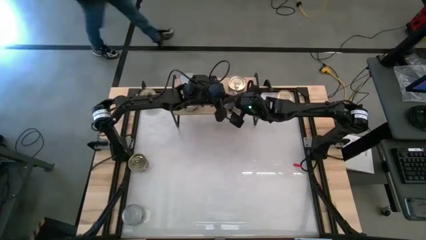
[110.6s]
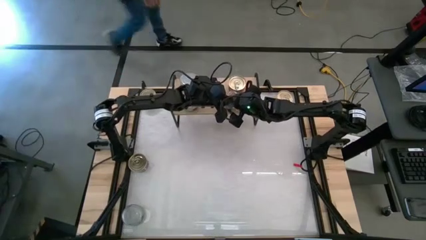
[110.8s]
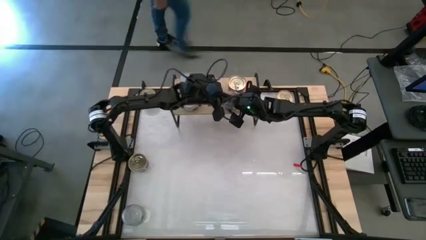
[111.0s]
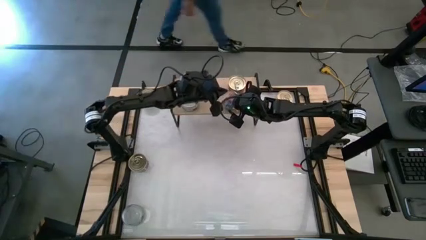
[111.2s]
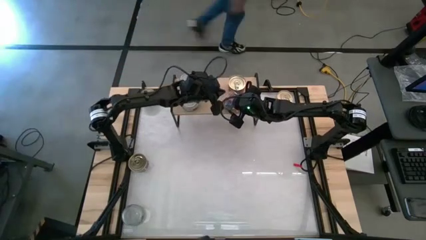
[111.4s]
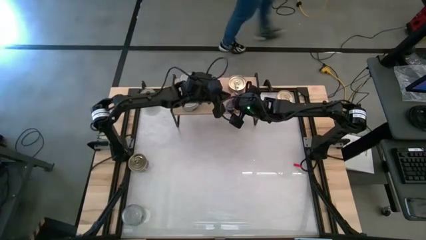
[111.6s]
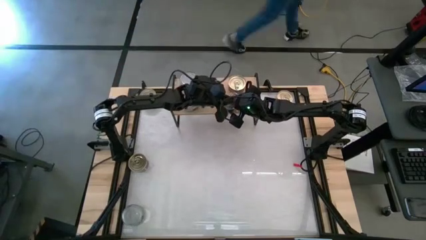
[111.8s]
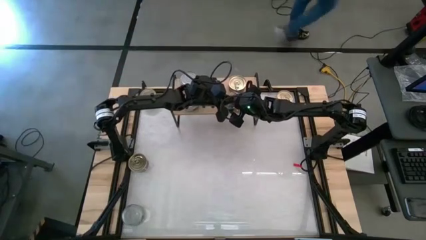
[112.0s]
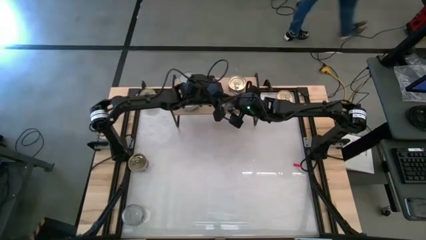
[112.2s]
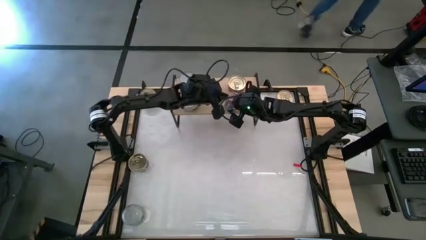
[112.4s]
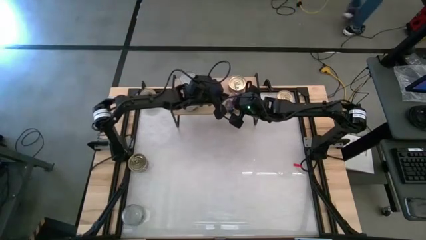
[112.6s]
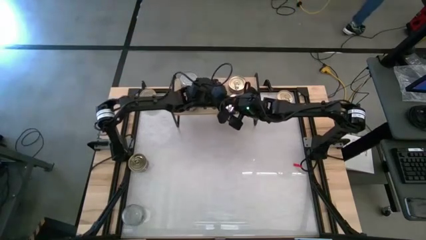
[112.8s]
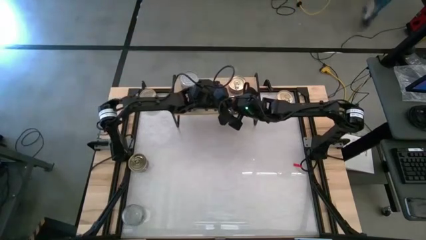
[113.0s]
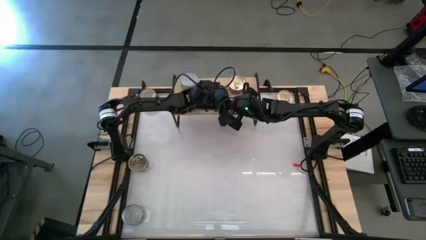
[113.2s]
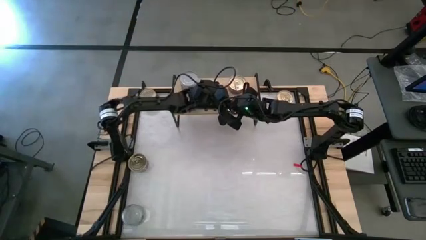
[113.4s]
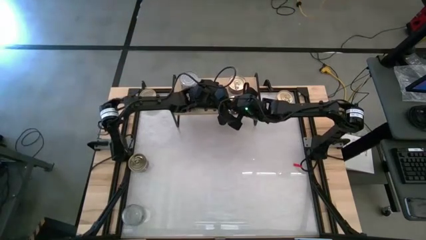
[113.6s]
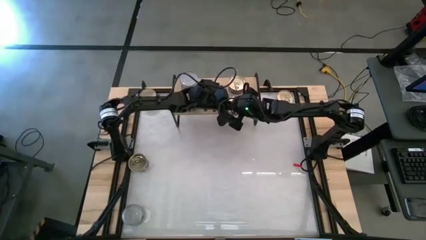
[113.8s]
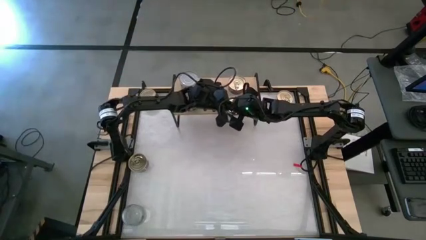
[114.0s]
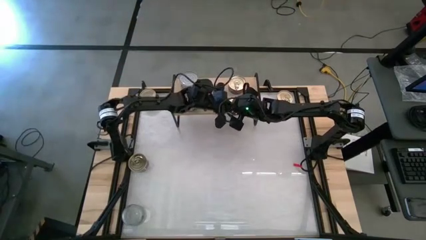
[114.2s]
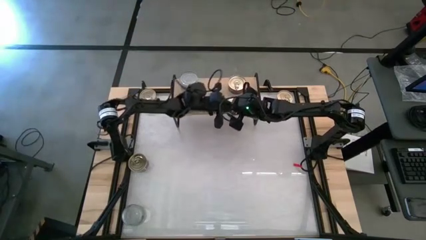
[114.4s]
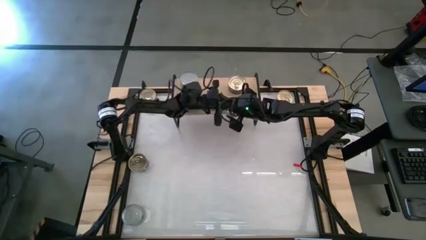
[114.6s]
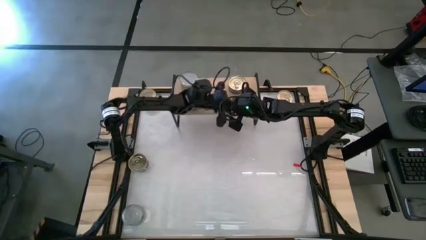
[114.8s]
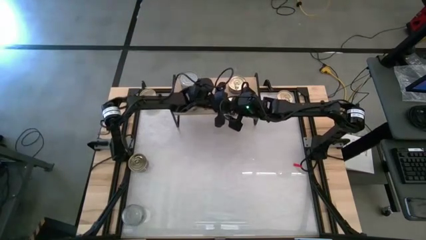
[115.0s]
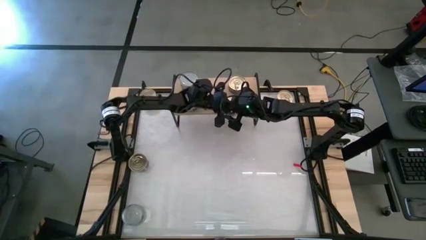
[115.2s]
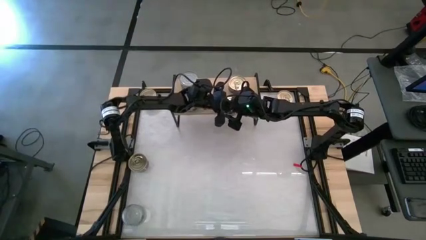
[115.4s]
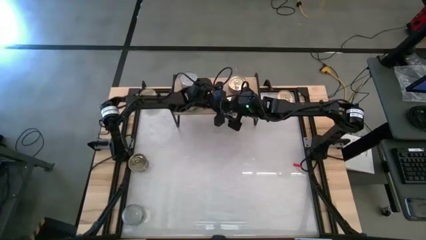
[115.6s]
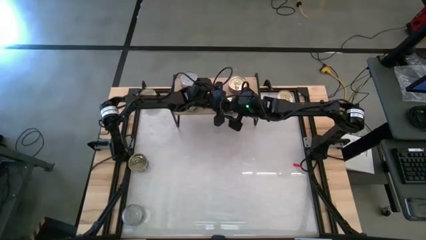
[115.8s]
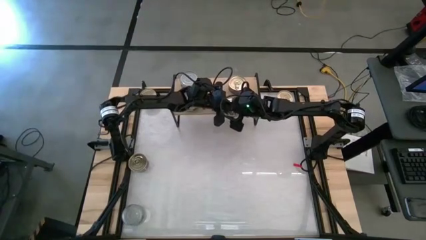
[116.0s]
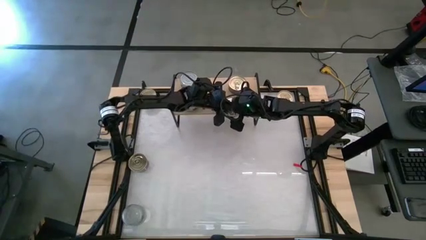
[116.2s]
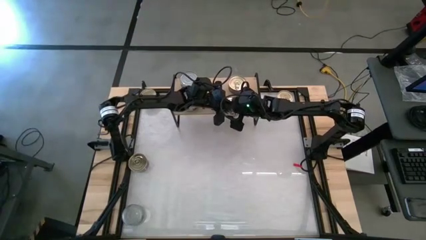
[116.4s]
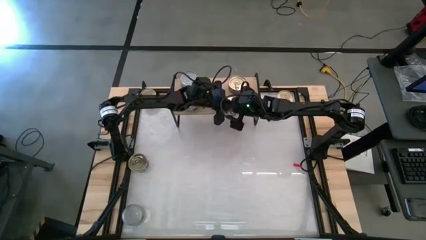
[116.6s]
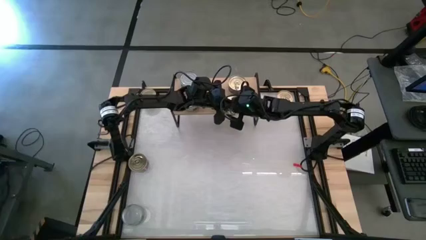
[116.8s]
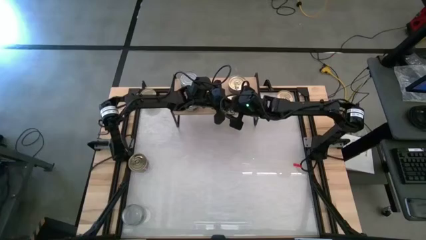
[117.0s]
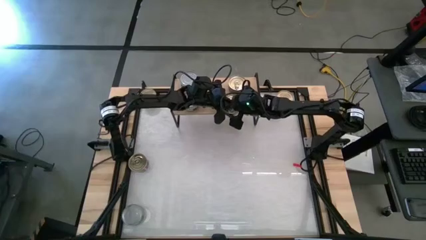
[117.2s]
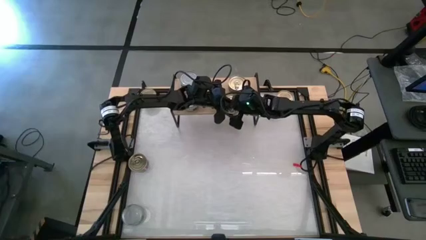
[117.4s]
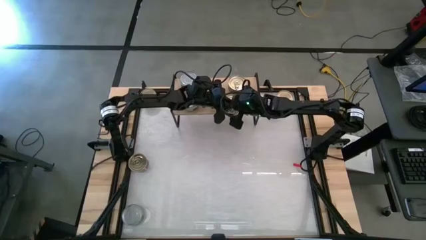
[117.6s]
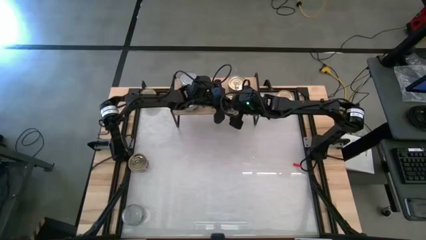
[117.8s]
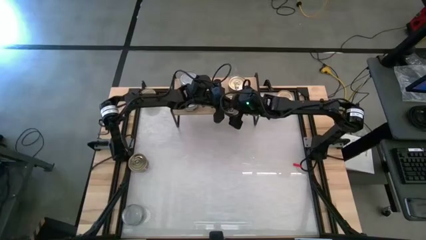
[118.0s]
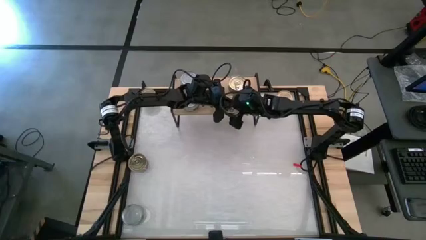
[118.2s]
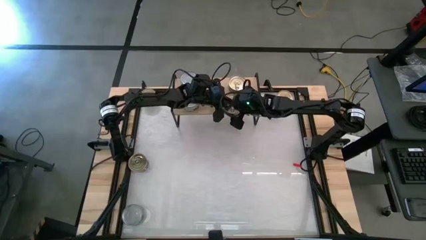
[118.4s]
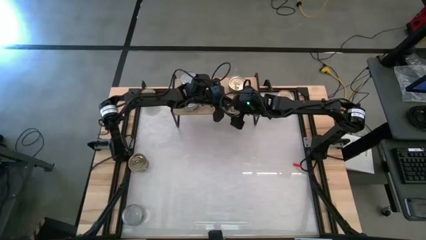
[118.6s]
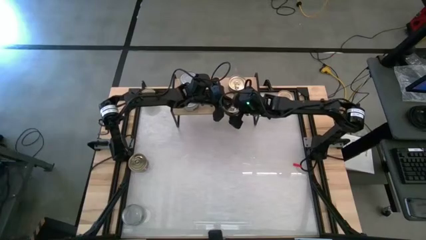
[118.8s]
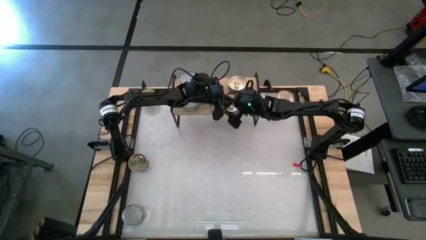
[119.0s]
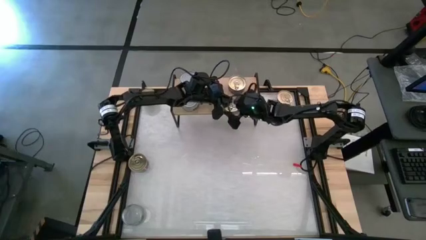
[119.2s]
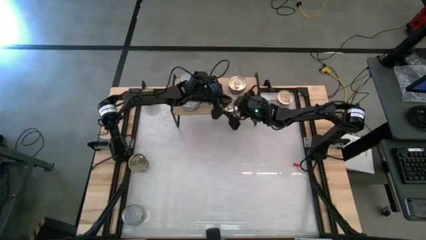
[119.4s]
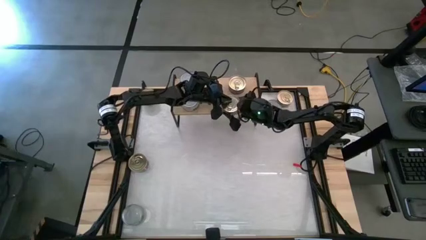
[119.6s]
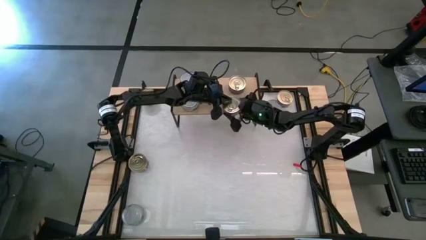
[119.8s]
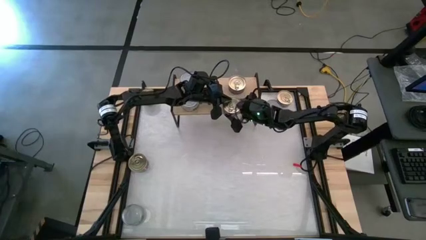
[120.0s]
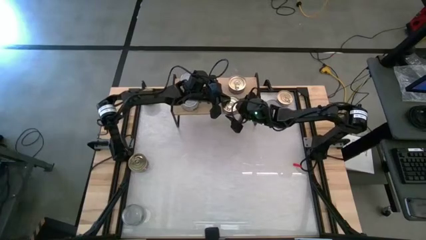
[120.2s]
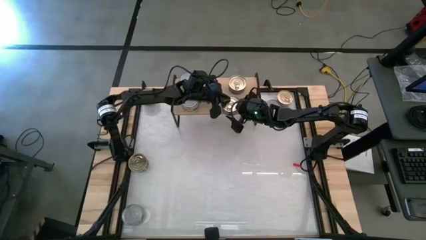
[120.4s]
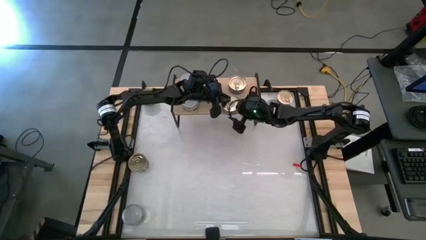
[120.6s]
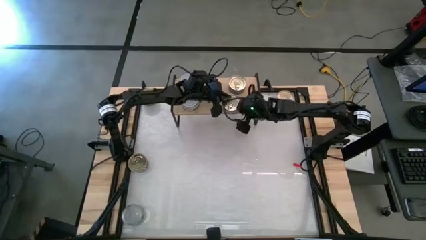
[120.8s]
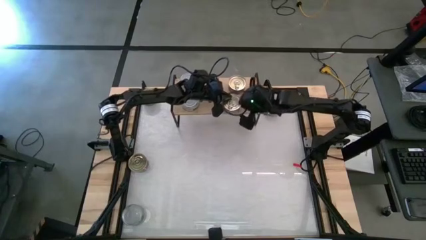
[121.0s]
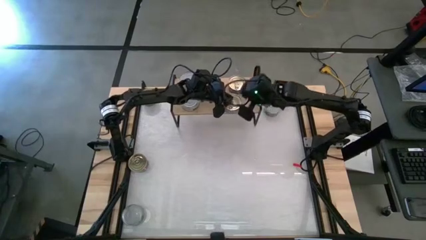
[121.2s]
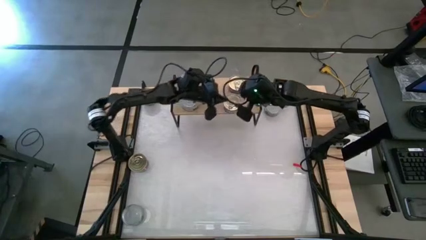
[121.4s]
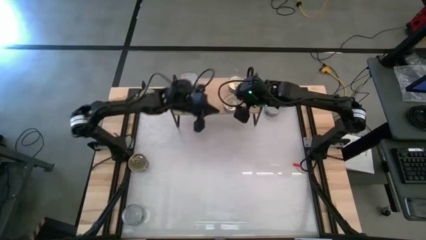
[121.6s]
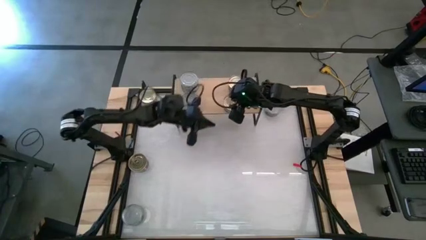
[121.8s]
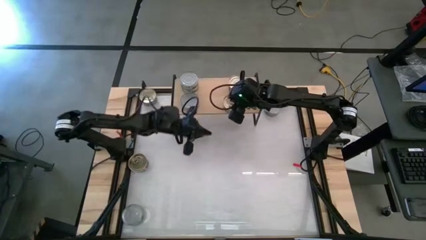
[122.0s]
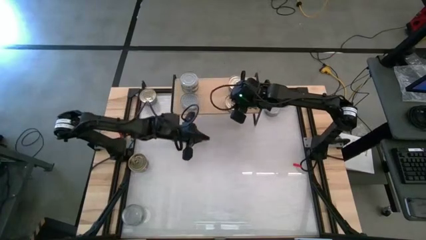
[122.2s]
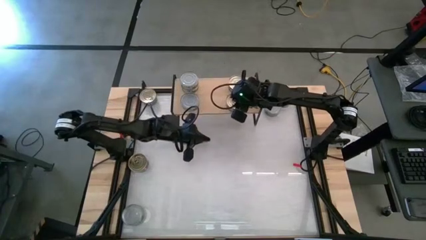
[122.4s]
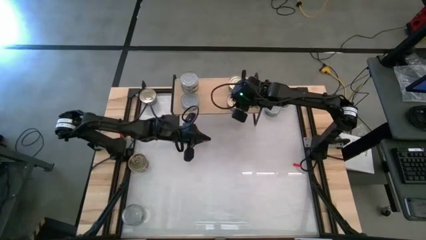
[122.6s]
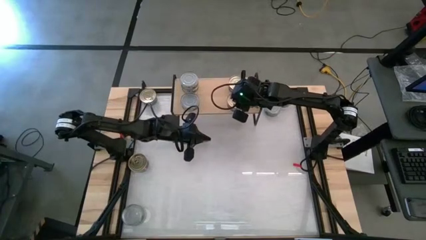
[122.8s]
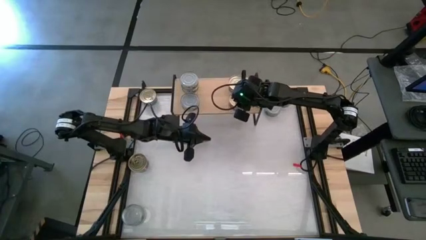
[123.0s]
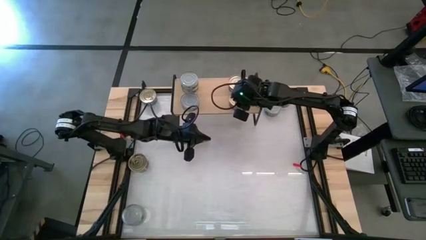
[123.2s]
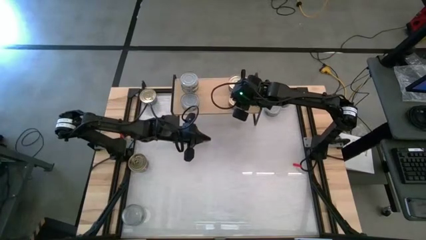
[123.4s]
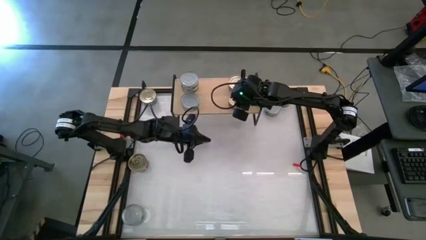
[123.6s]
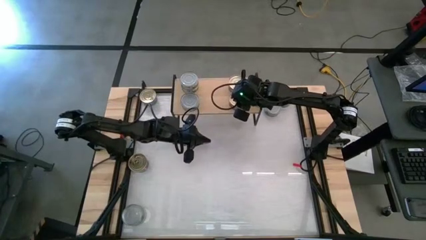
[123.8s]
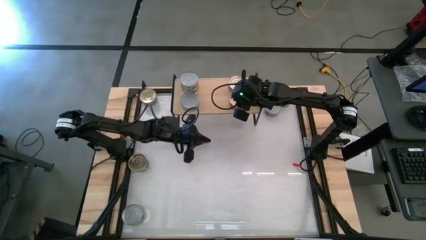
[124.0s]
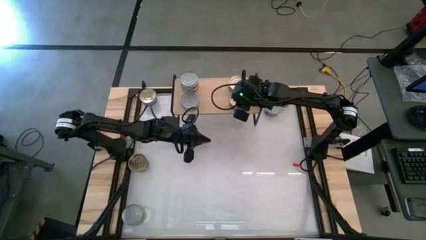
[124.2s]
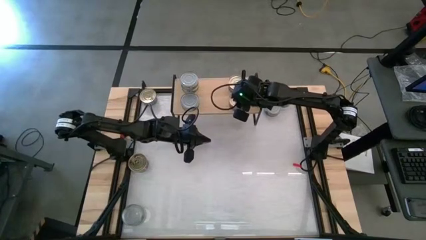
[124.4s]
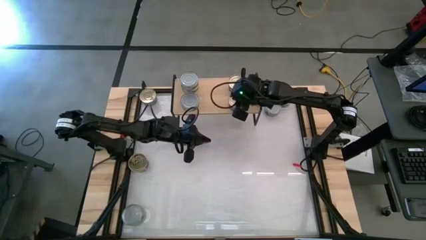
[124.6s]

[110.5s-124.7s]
Task: Stack canned seafood by type on shelf
Put the blue tuna can on the shelf
